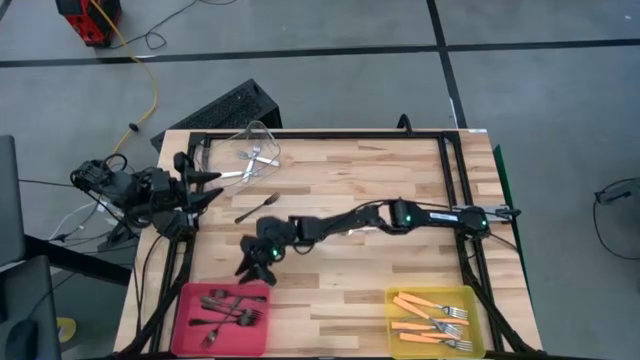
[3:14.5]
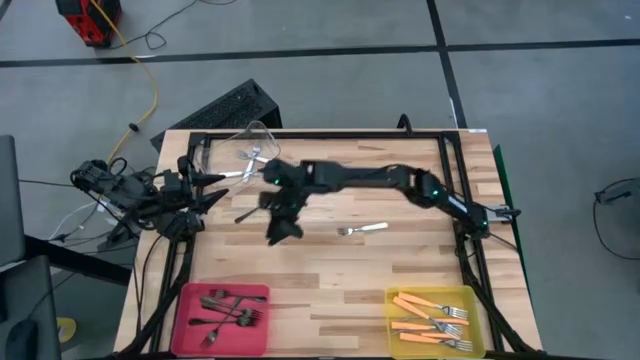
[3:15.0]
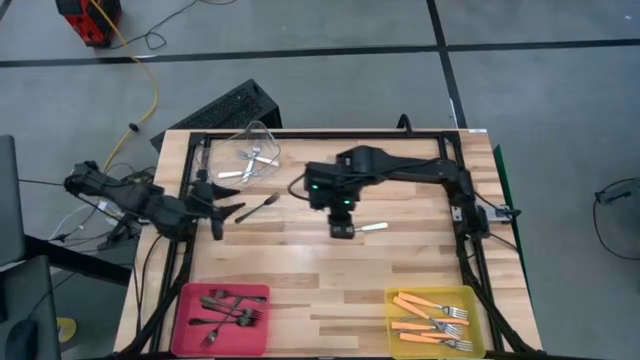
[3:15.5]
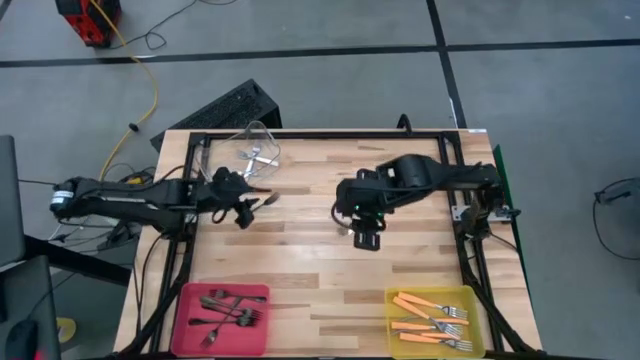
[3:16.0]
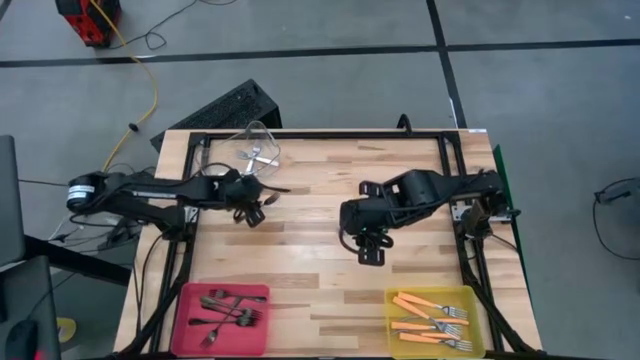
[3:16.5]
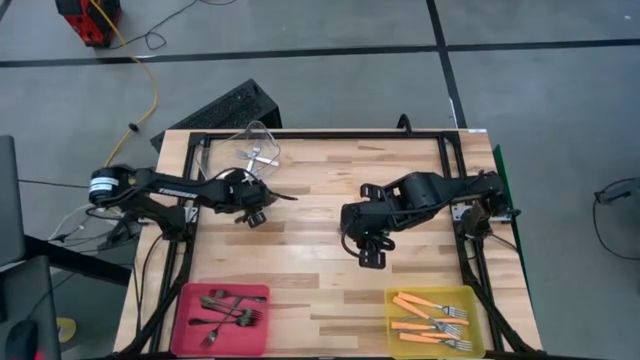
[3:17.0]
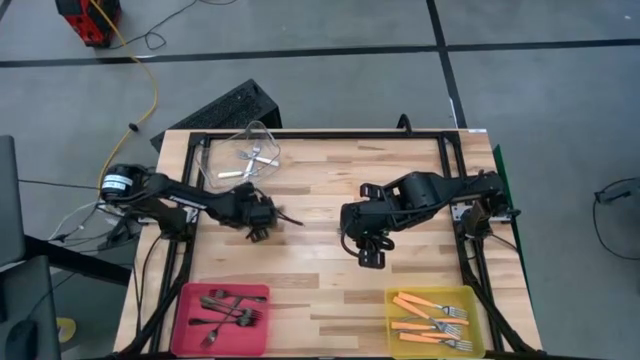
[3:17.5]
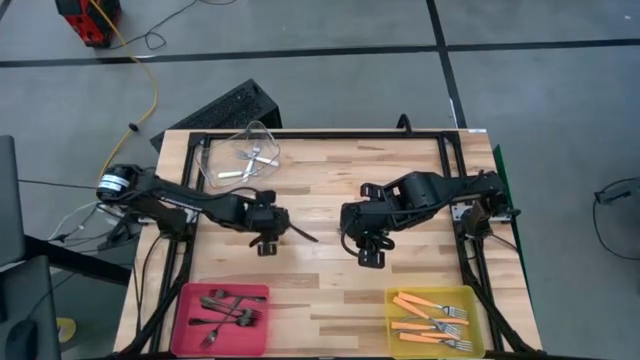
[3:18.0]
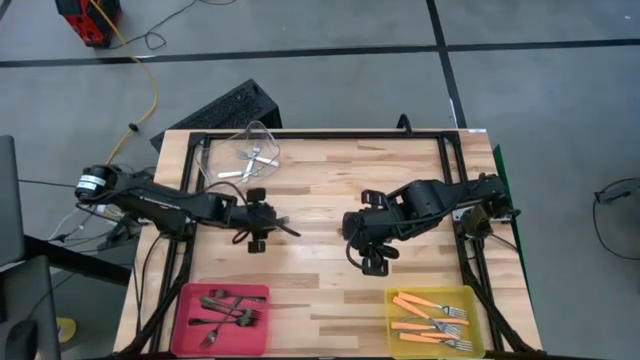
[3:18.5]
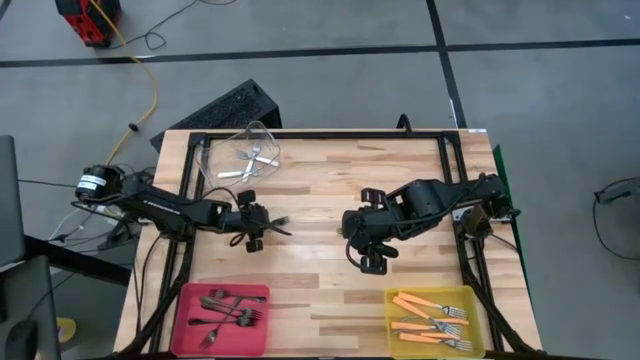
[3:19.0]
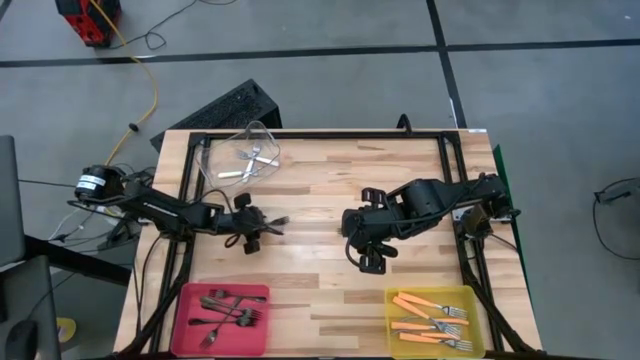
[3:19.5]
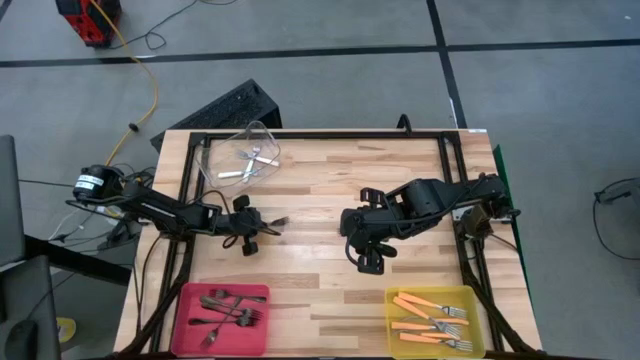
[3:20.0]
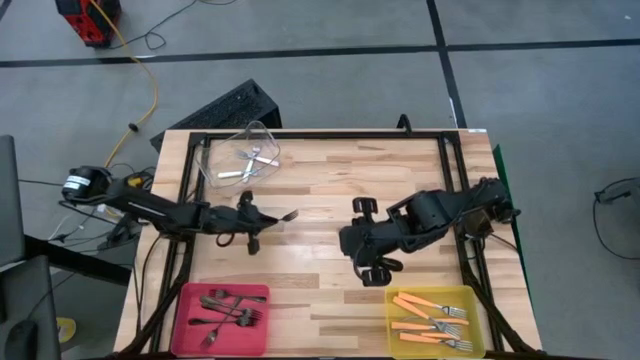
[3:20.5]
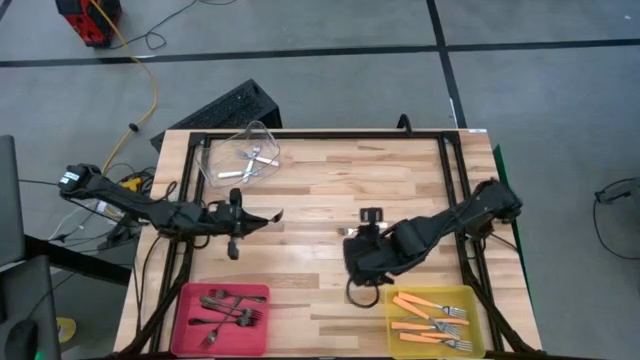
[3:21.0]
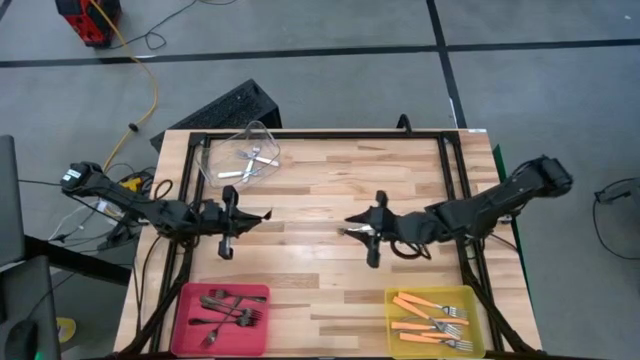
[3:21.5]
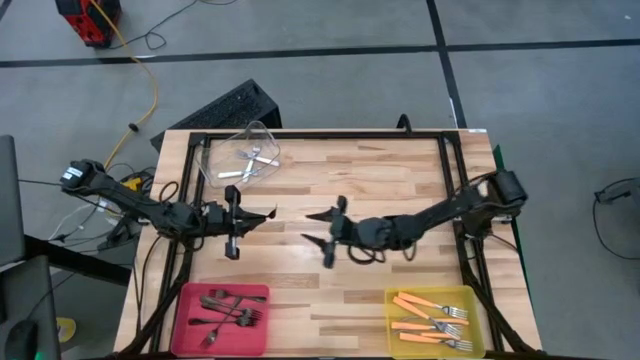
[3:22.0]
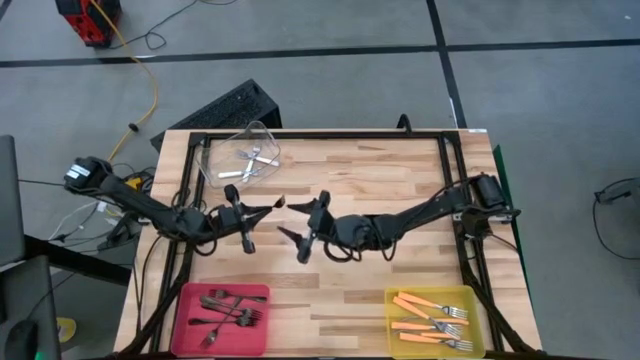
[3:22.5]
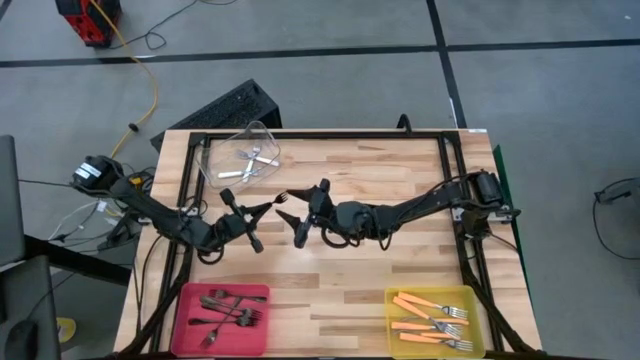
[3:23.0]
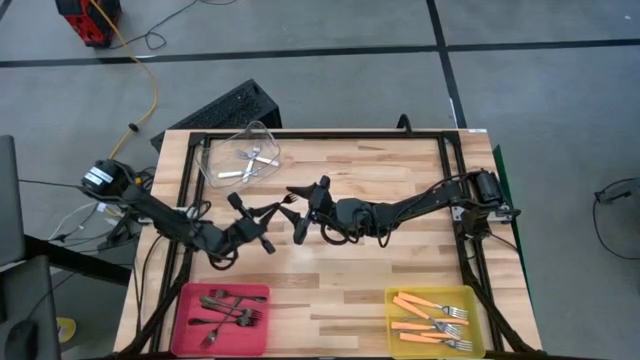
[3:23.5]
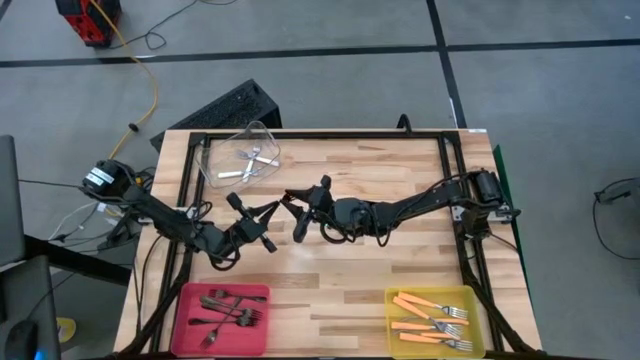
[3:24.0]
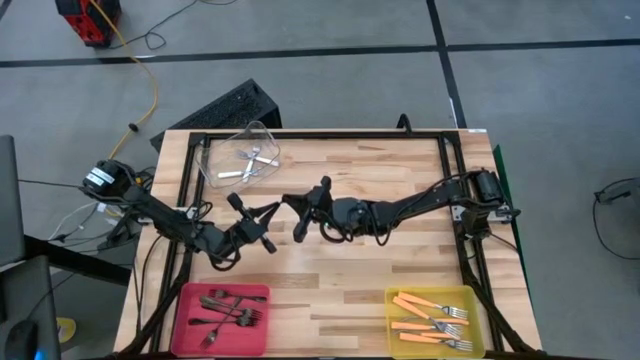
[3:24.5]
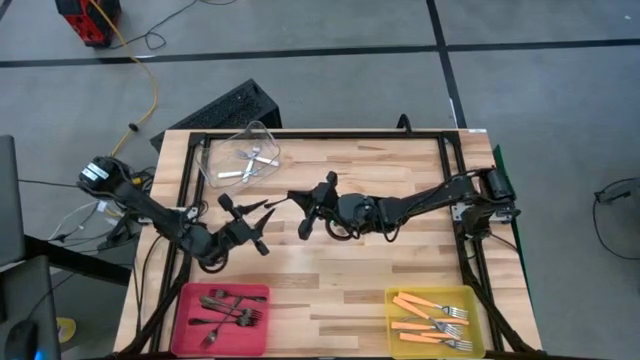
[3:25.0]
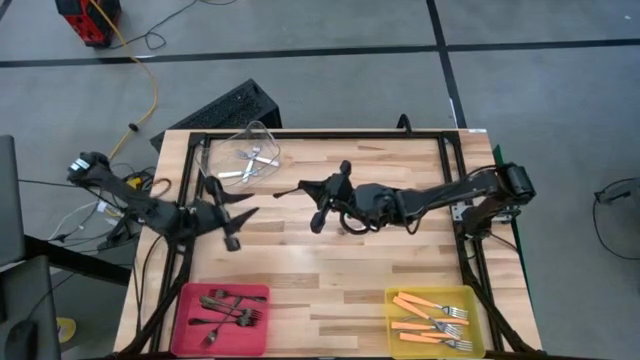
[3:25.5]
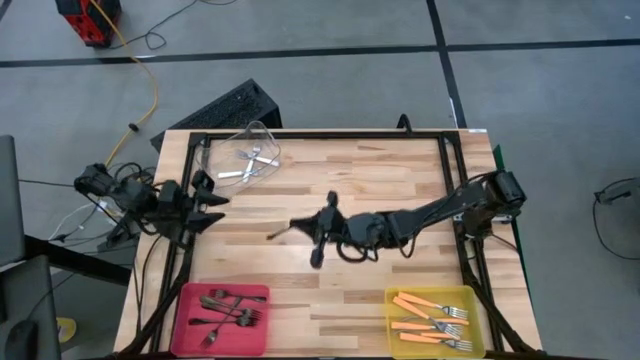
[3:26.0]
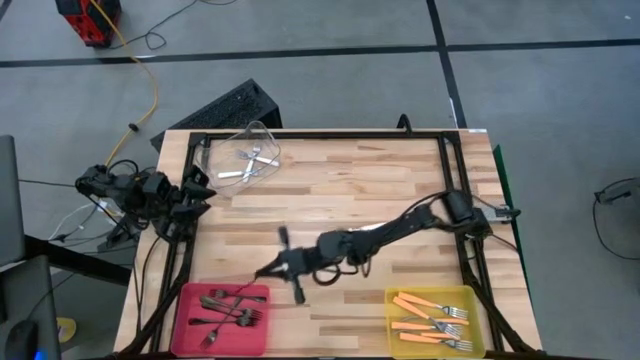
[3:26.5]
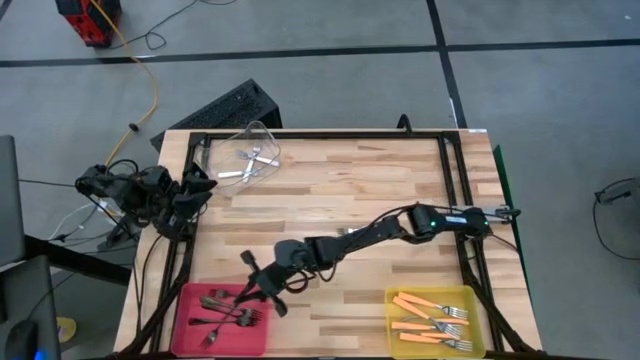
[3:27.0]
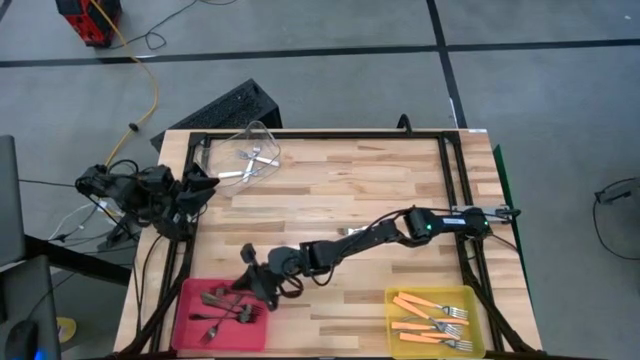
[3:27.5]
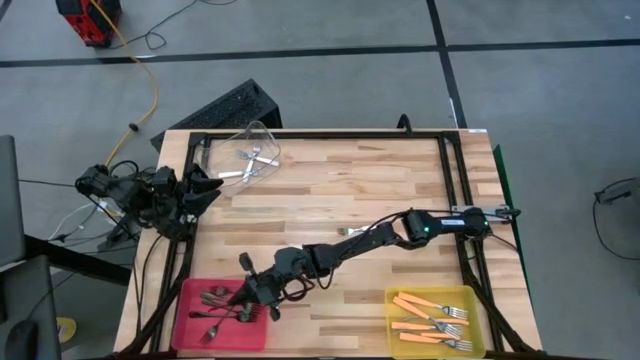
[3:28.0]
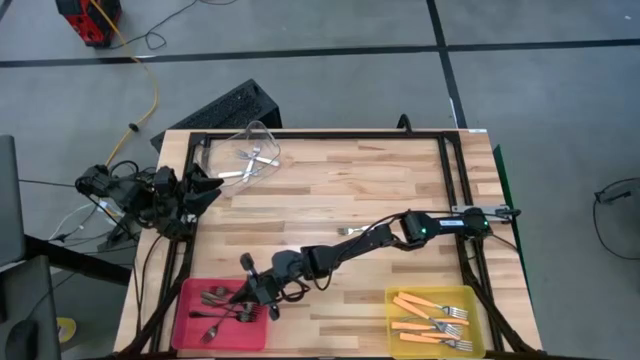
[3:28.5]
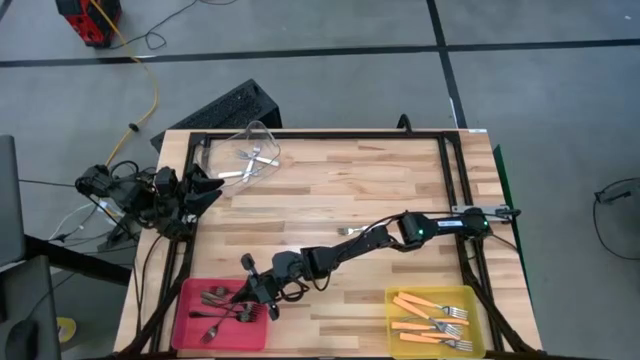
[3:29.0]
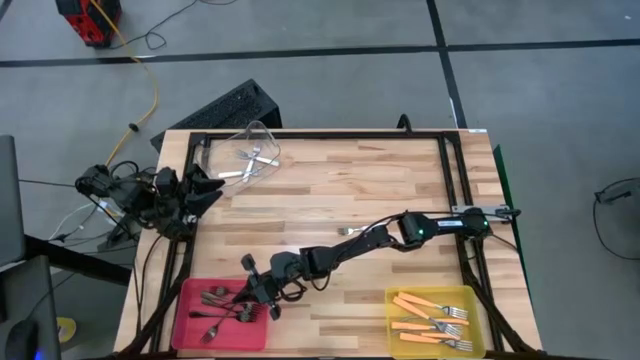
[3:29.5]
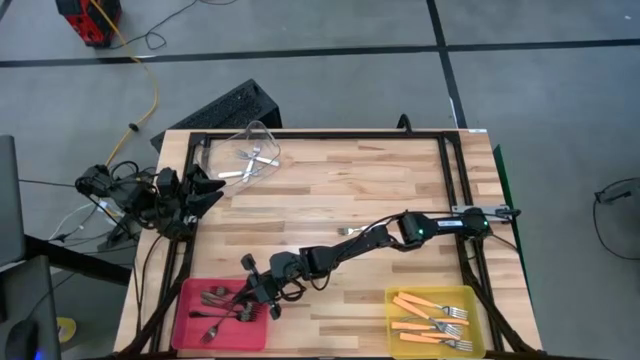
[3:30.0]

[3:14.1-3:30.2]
Task: Sort silverware by color (type)
Put the black fork into the red bin

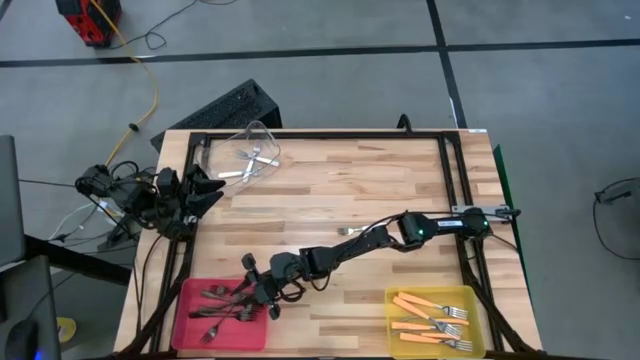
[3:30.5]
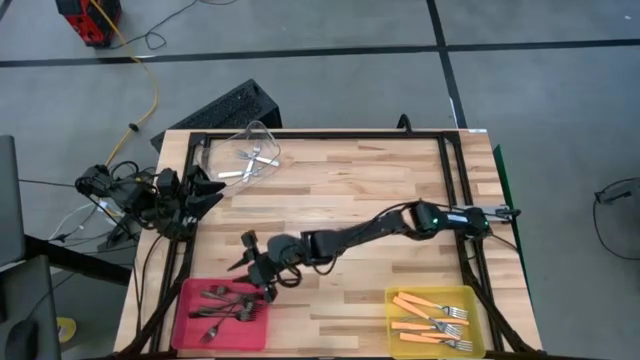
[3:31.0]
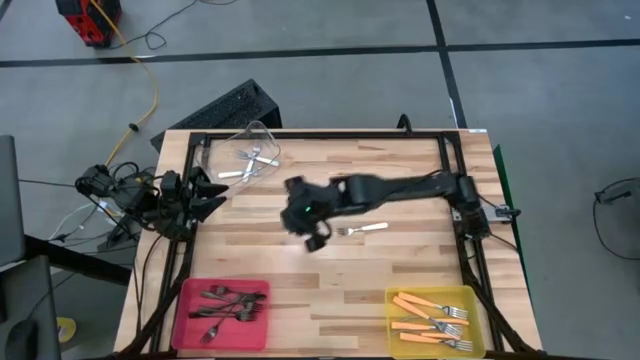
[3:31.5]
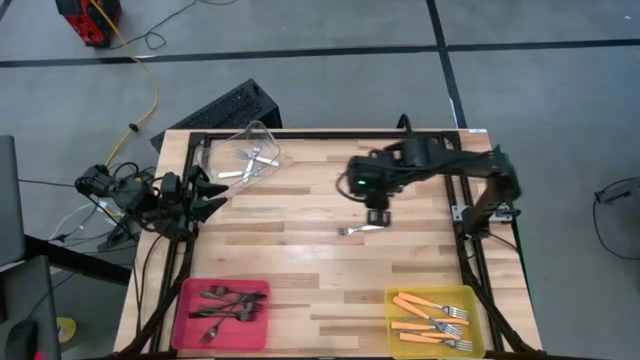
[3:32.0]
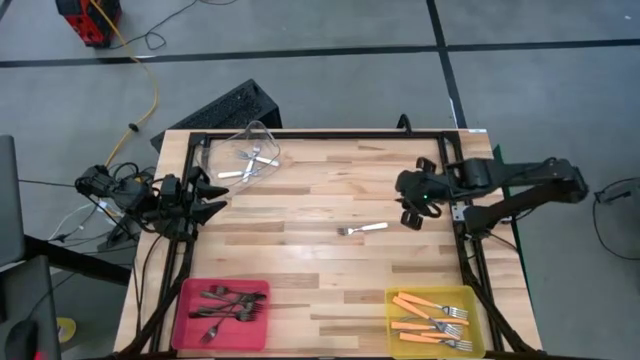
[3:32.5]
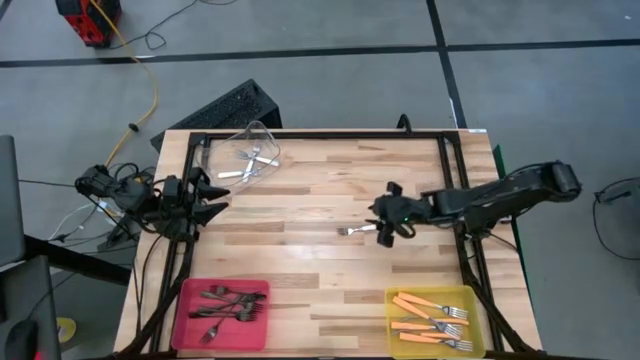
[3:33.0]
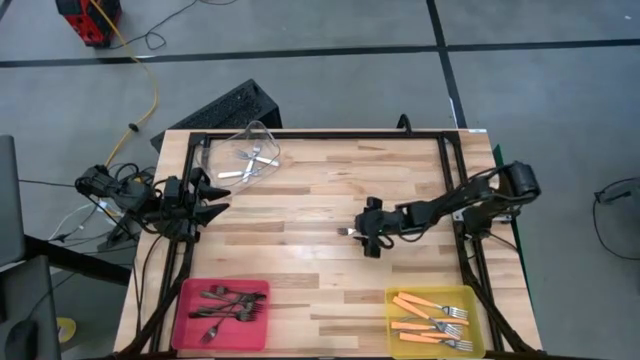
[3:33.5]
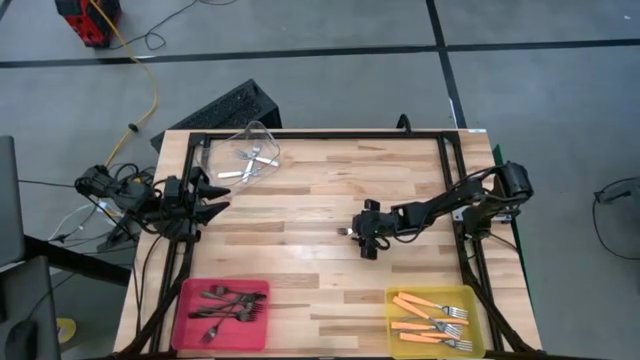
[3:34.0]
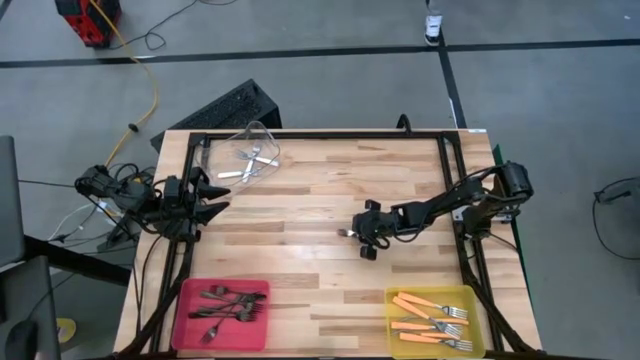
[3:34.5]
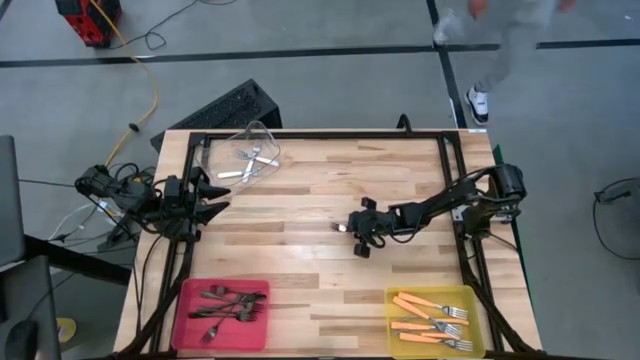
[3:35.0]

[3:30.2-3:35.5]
Put the white fork into the transparent bin

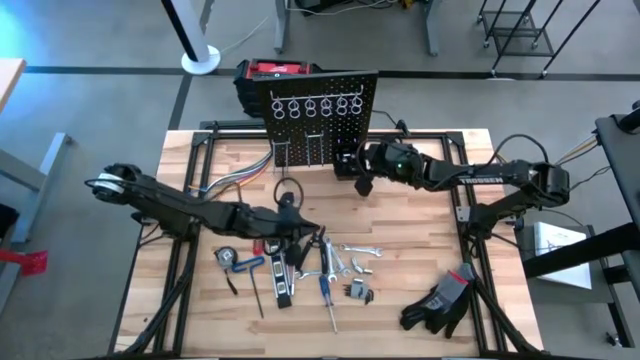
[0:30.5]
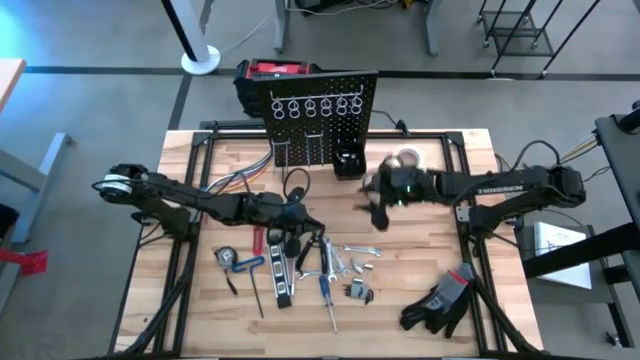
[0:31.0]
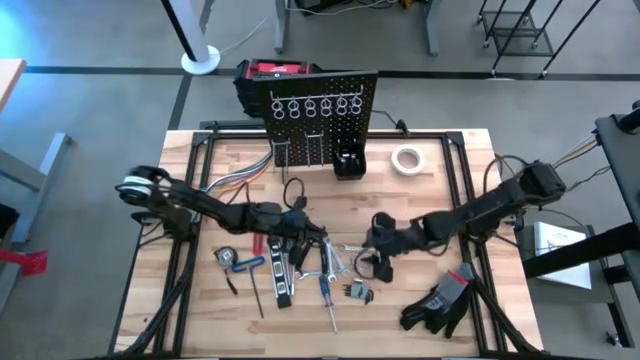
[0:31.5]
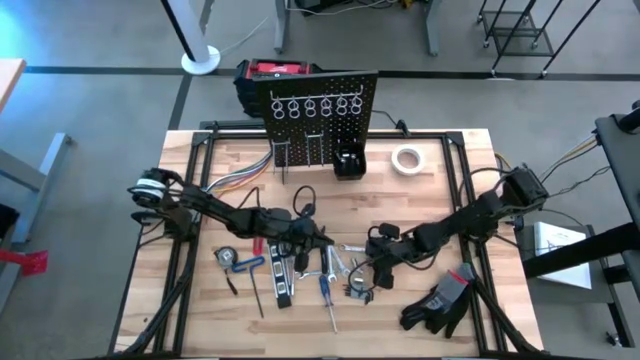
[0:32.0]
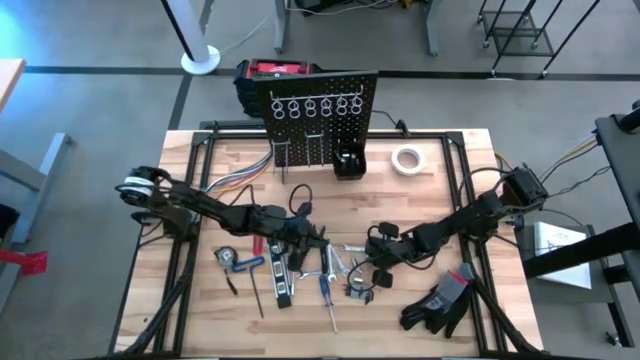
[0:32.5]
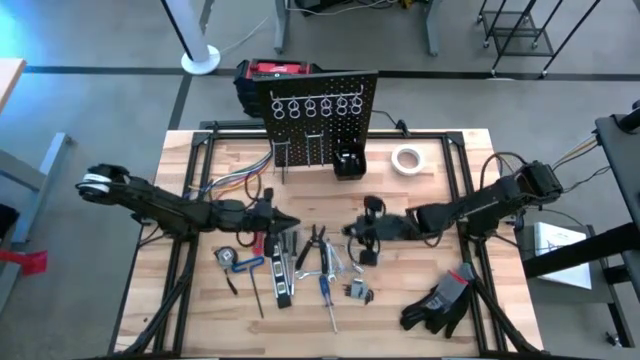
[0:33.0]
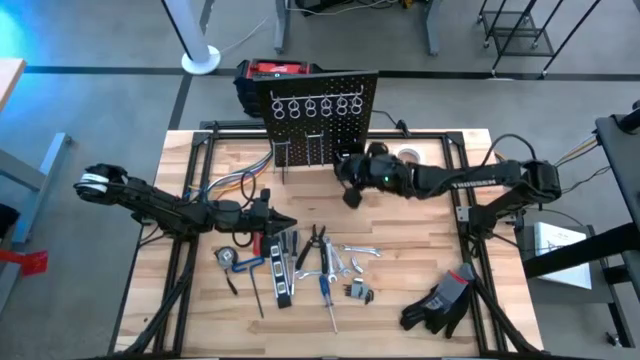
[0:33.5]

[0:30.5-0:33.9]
Task: Hang tools onto peg board
Put the socket into the black tool bin on the peg board
